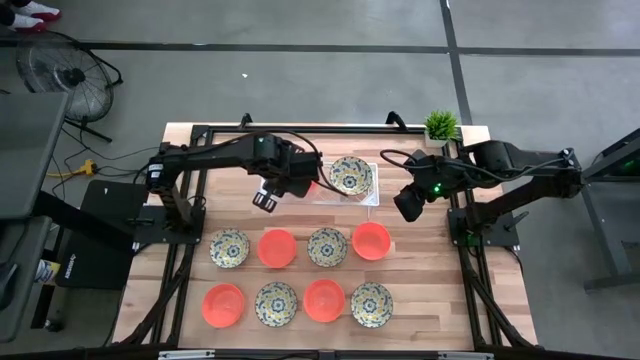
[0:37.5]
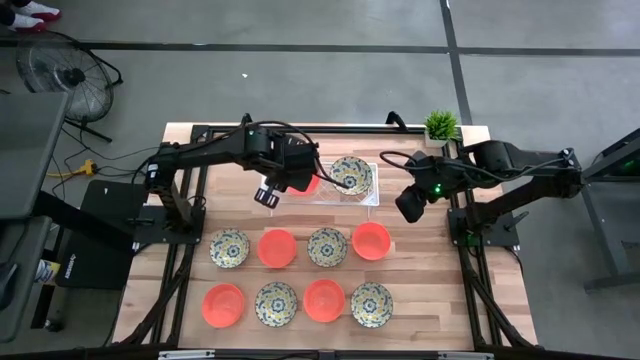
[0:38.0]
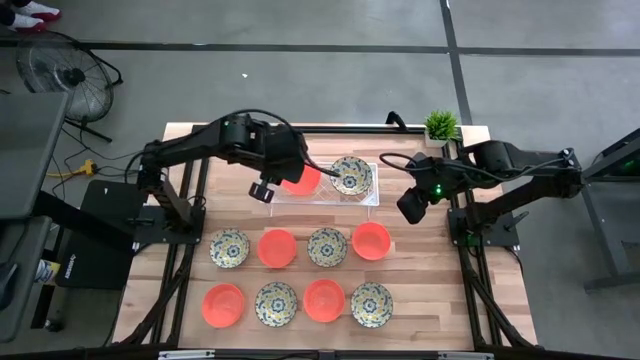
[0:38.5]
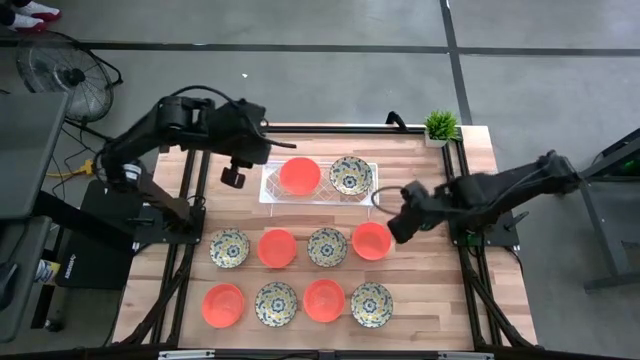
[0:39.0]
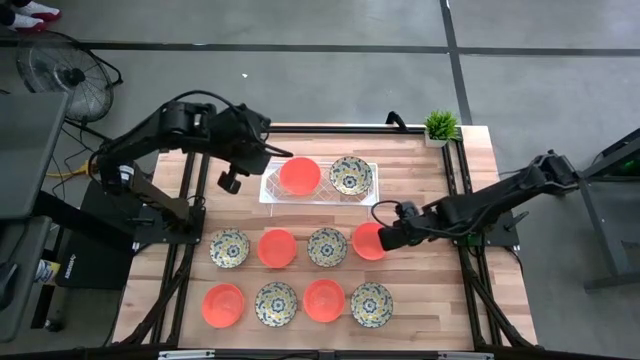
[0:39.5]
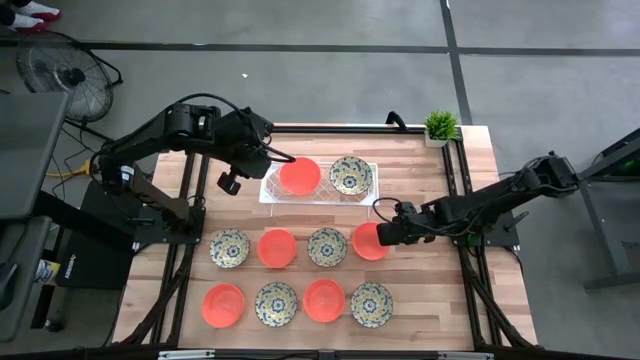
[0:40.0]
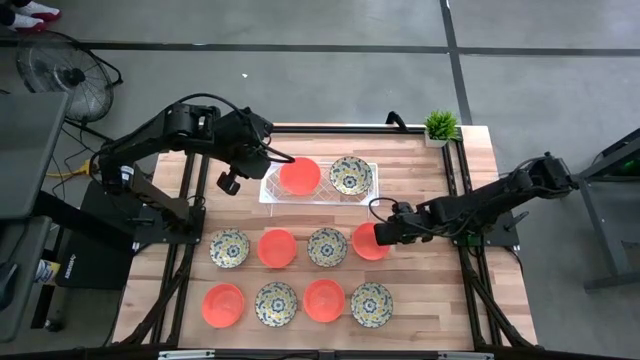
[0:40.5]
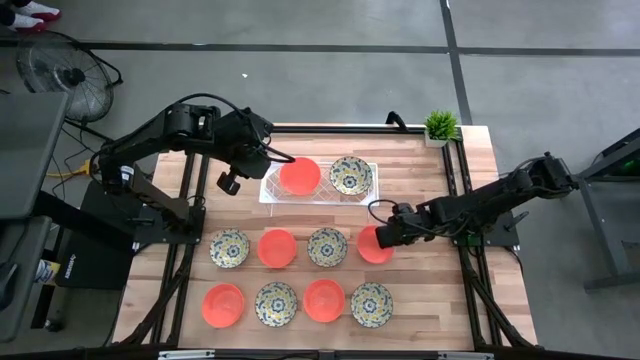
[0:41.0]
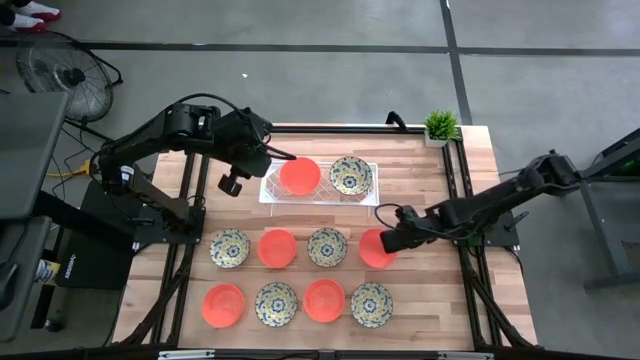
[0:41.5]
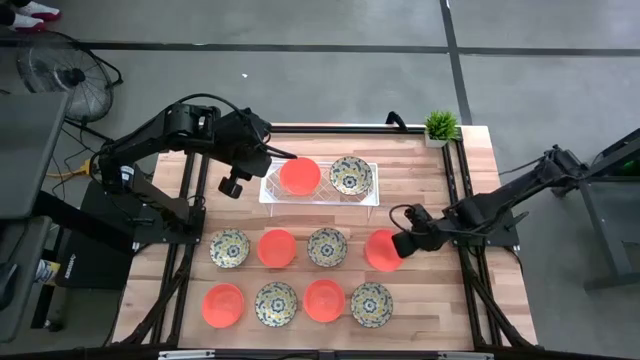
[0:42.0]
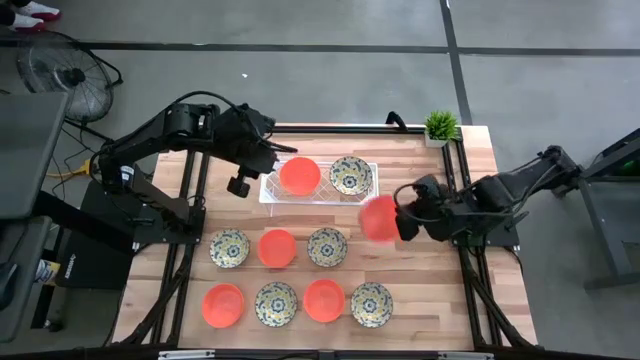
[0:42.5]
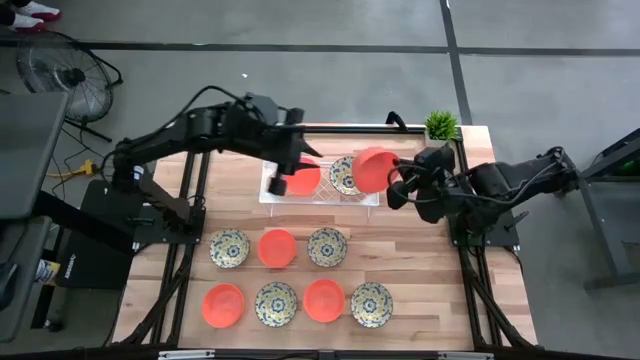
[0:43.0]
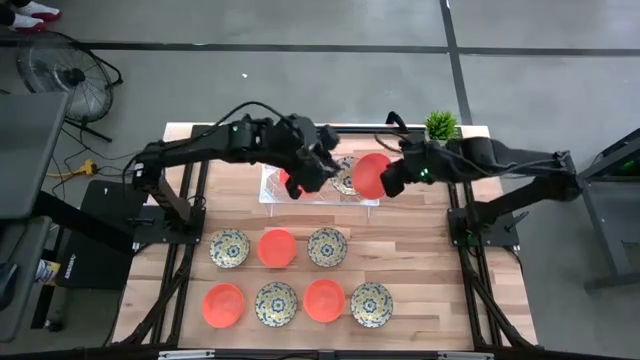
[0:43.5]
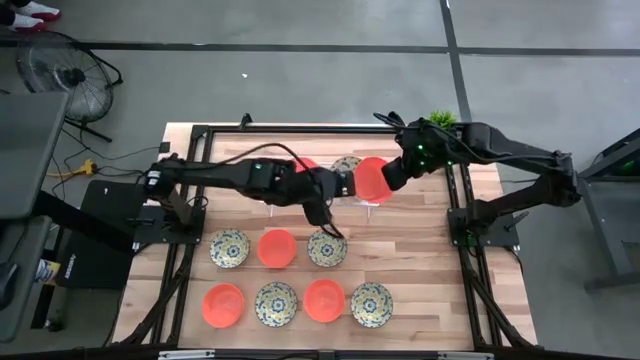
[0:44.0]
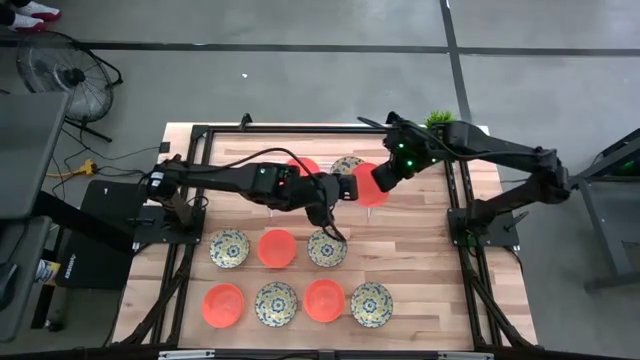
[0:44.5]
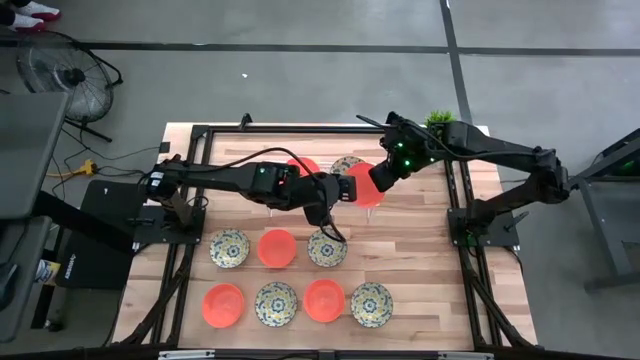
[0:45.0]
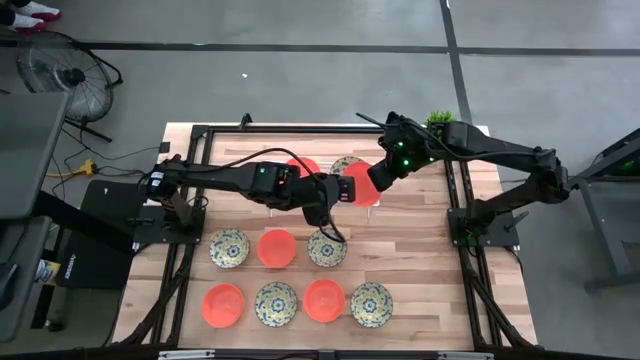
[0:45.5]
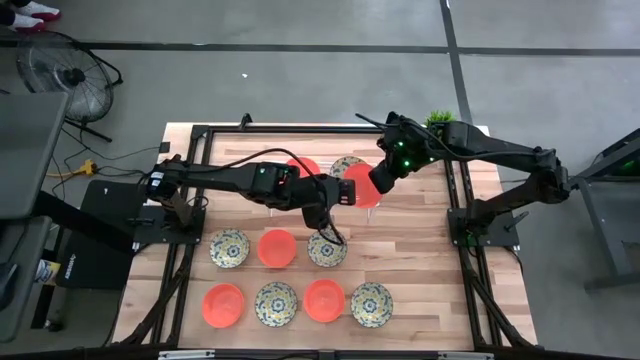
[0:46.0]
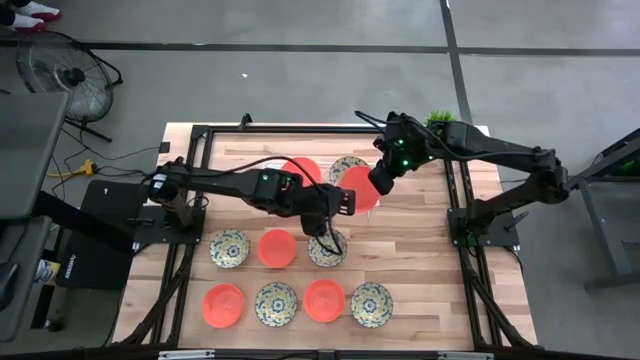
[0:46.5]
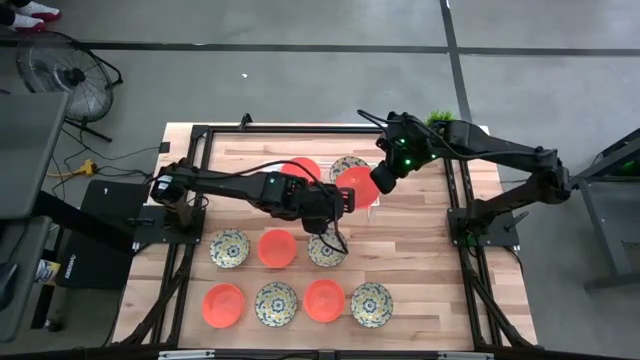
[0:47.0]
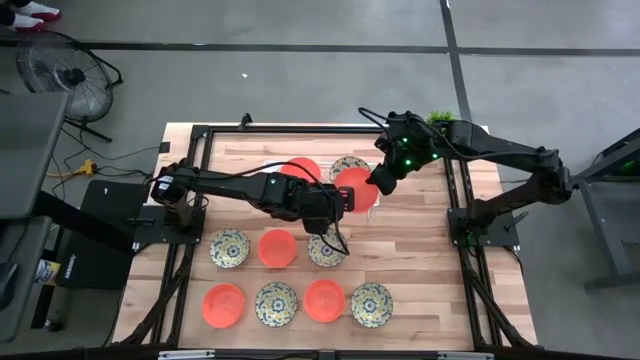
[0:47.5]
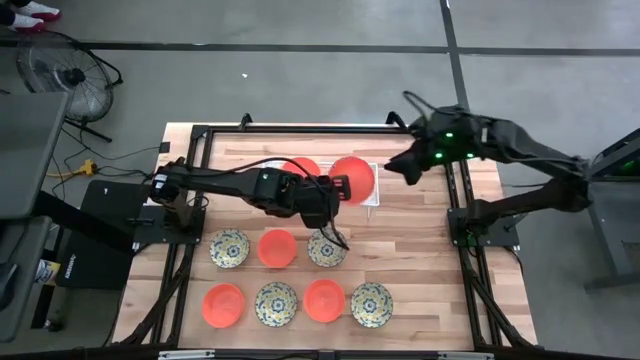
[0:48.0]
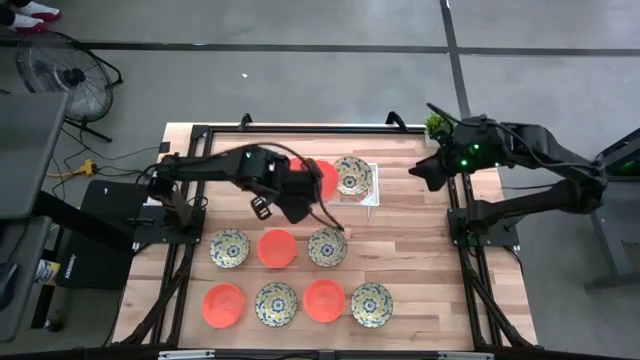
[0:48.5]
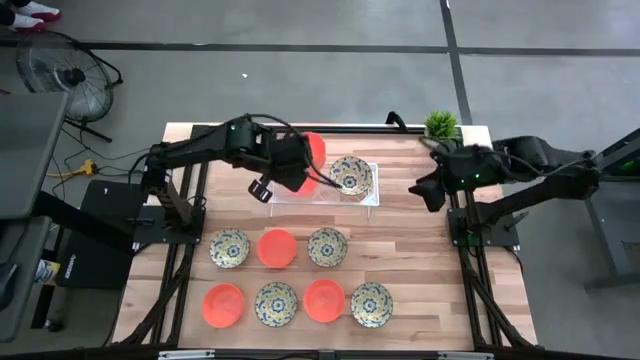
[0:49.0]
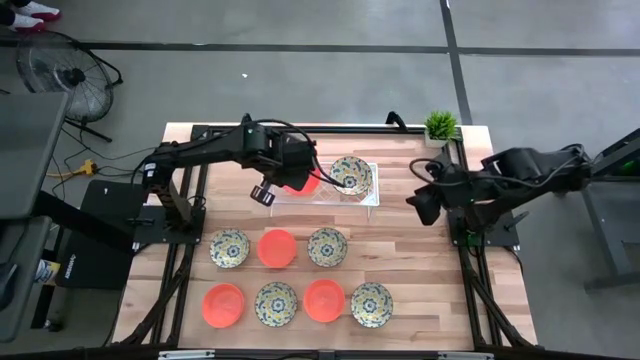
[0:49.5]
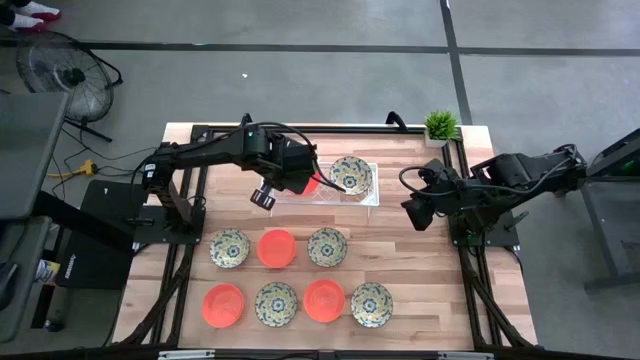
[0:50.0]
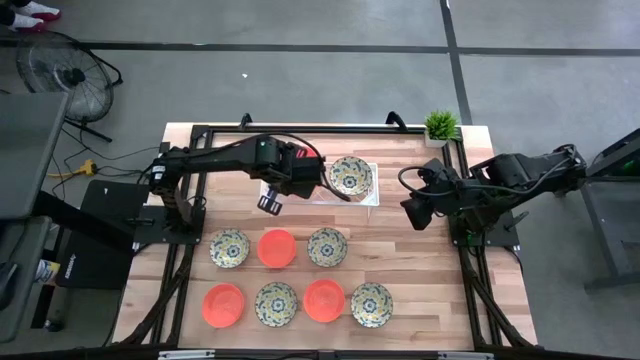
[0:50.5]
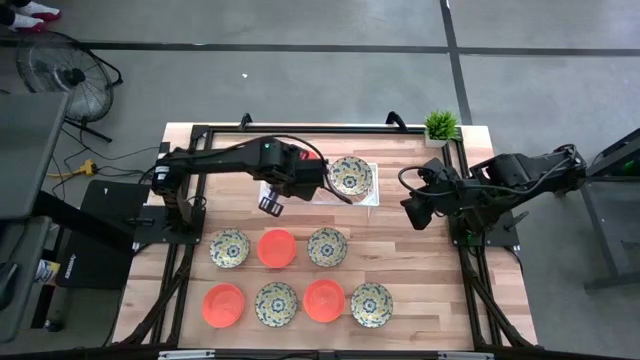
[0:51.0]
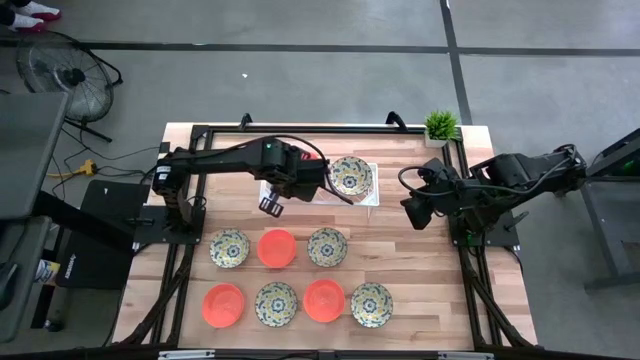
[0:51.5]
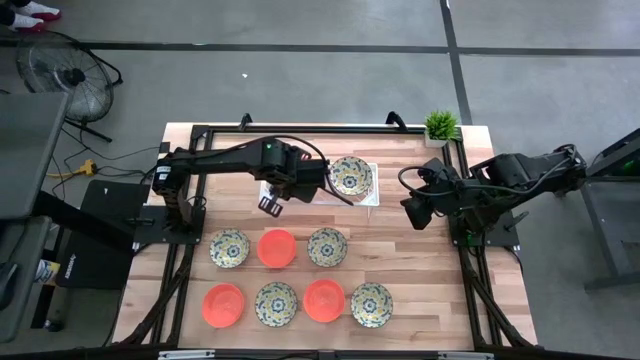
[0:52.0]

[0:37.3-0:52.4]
Task: Pick & Place Mini bowls
Stack the orange bowl on top of the other orange bowl on the shelf

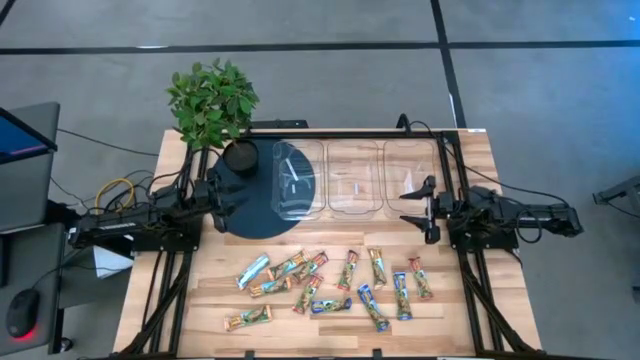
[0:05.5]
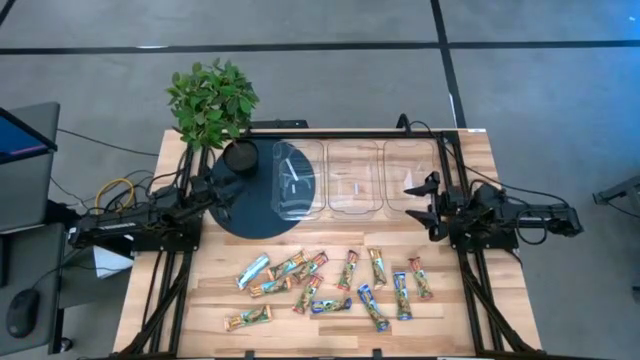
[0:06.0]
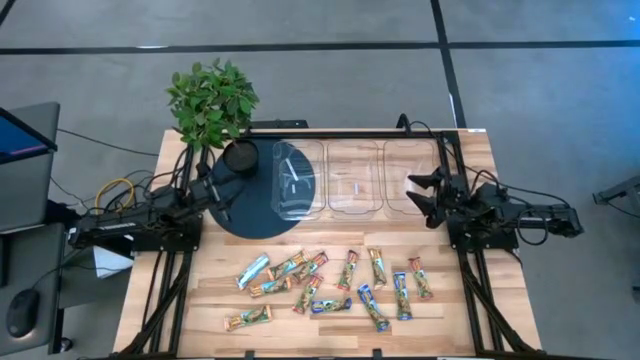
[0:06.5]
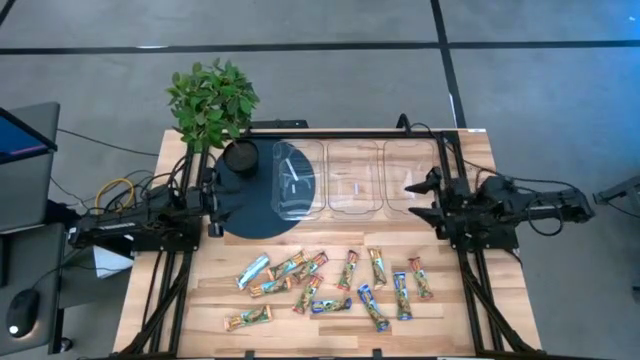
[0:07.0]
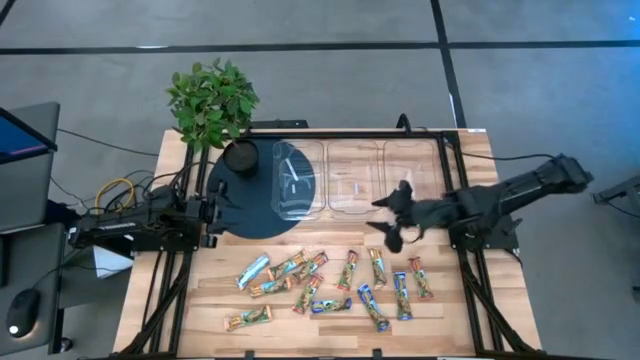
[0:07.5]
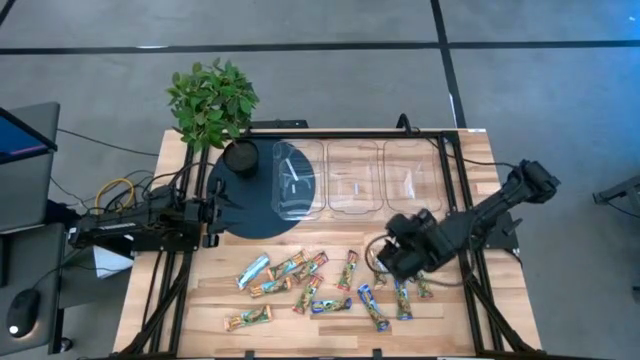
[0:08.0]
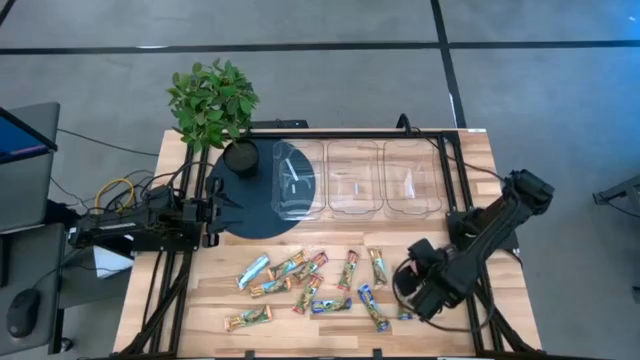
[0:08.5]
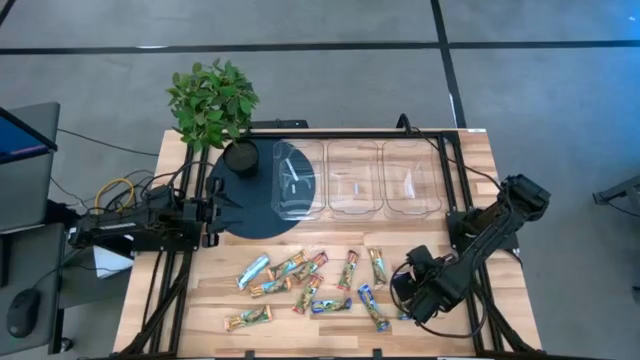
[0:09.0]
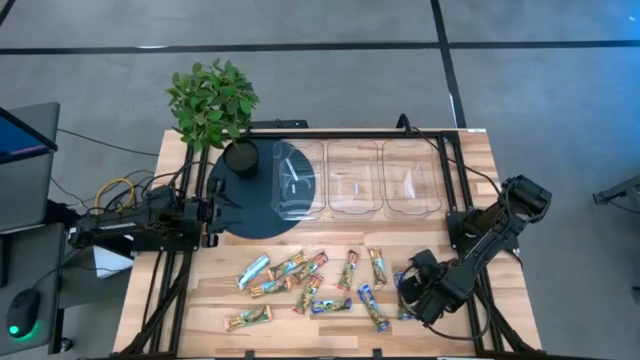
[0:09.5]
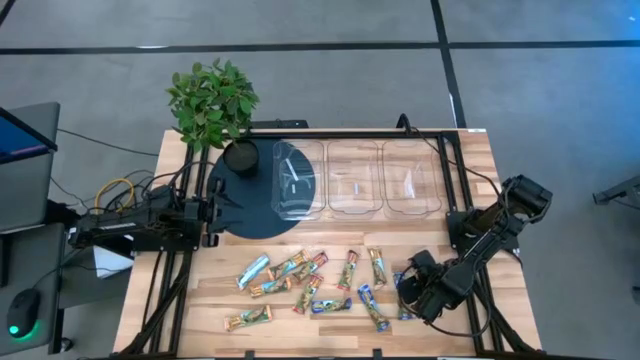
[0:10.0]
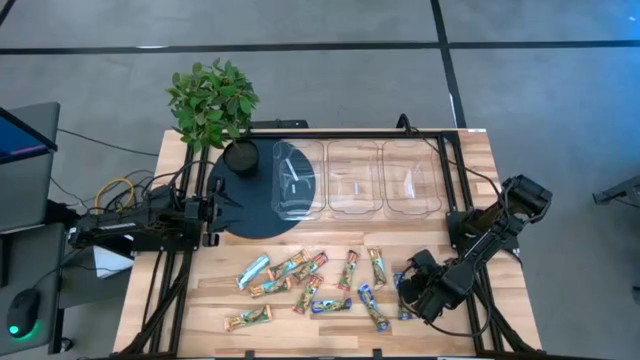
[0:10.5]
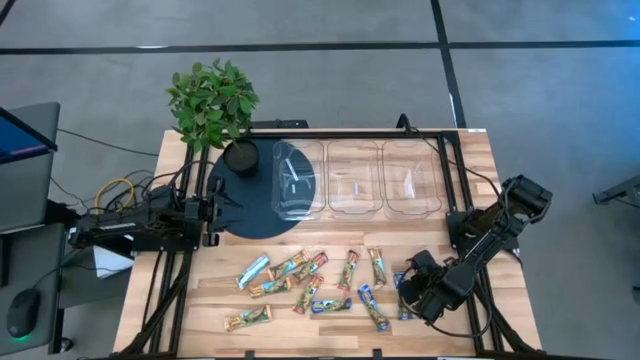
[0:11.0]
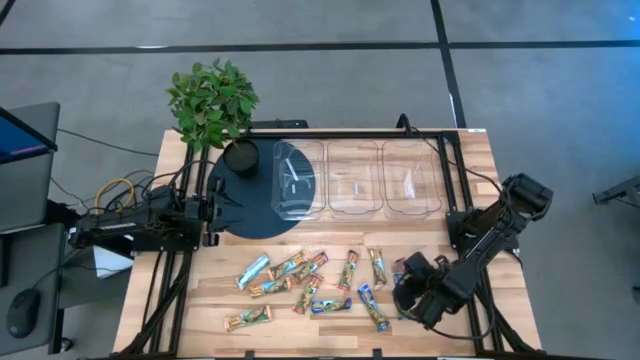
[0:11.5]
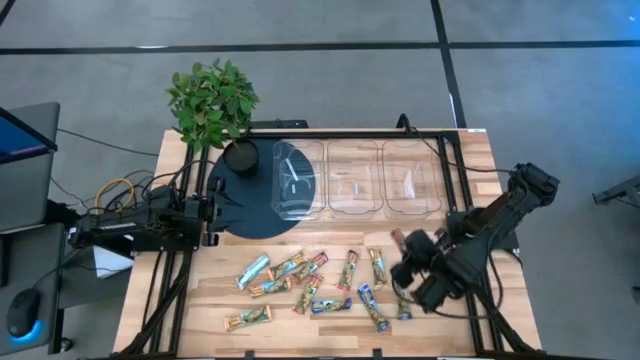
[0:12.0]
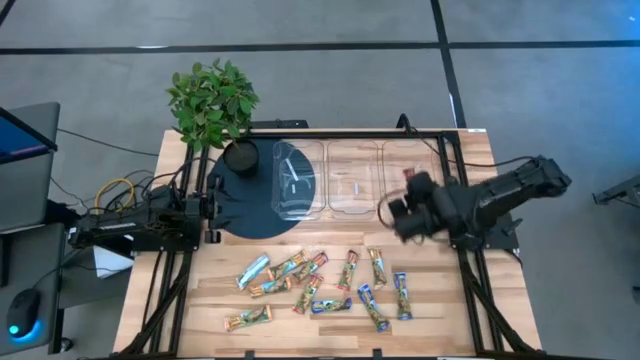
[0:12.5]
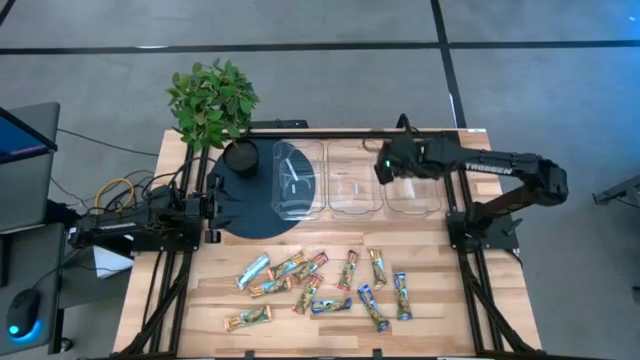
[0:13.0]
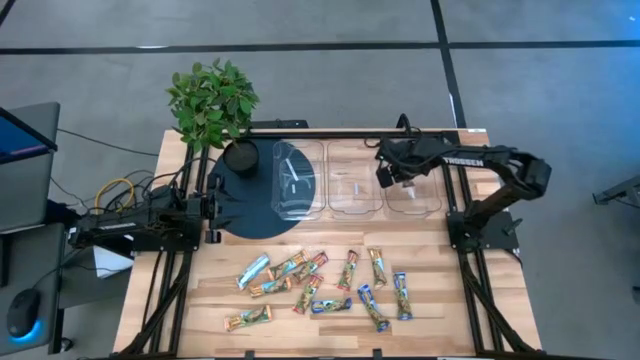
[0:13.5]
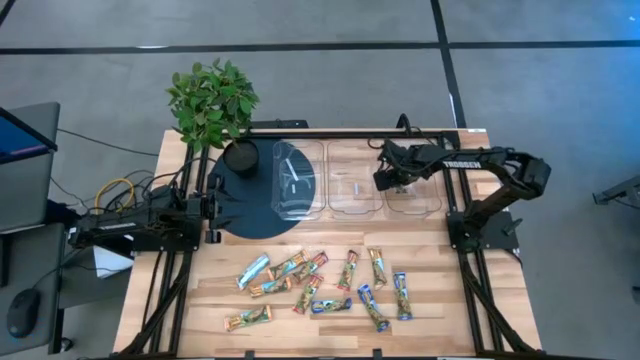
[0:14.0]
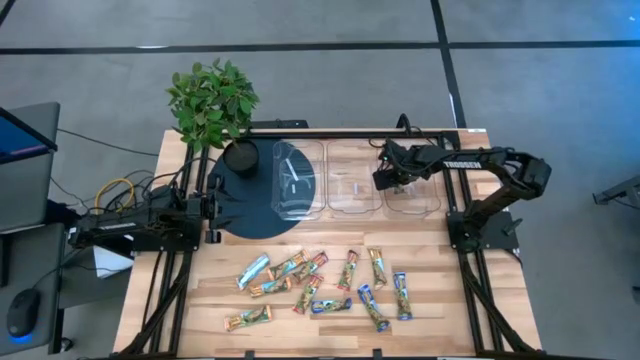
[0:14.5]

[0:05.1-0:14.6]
Task: Pick and place Granola Bars by type
Put the red granola bar into the right transparent bin
